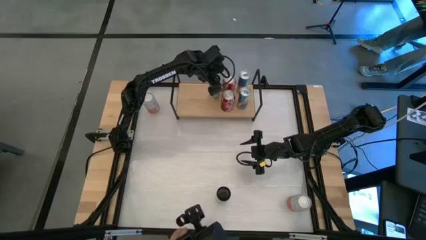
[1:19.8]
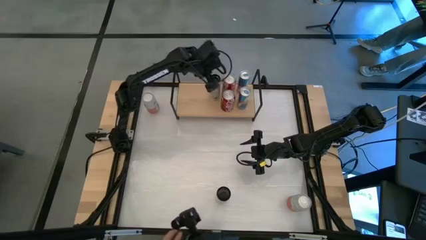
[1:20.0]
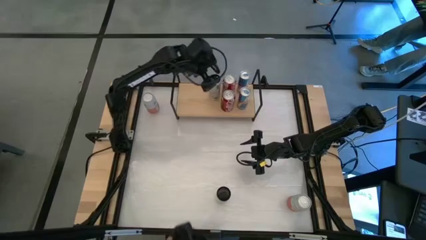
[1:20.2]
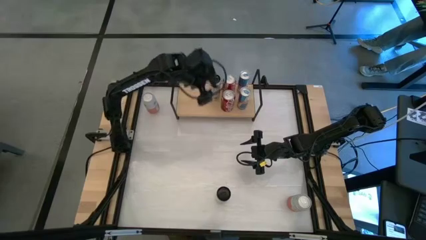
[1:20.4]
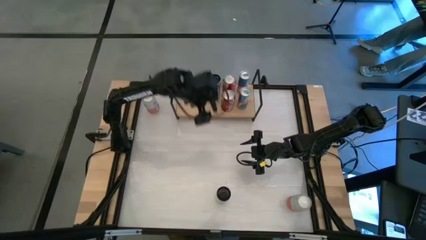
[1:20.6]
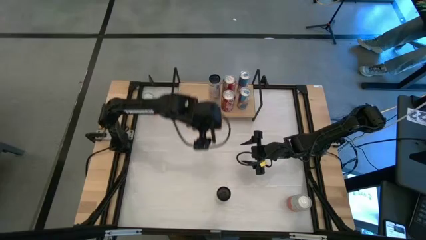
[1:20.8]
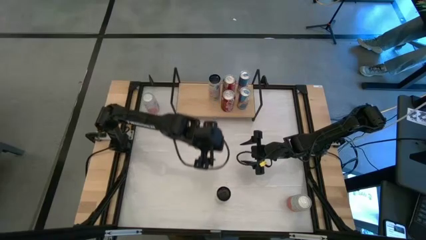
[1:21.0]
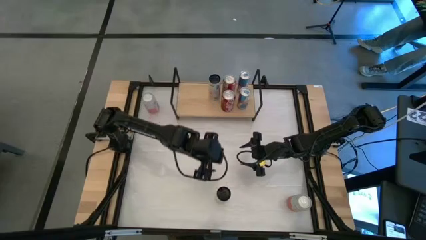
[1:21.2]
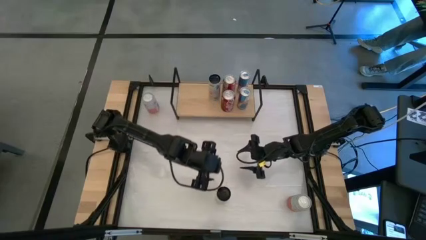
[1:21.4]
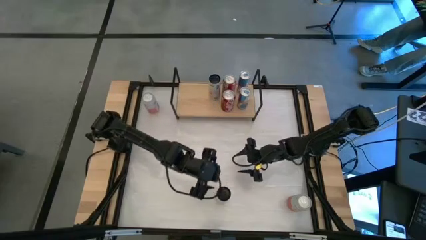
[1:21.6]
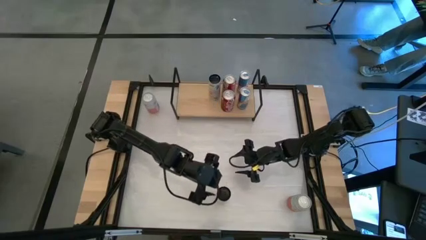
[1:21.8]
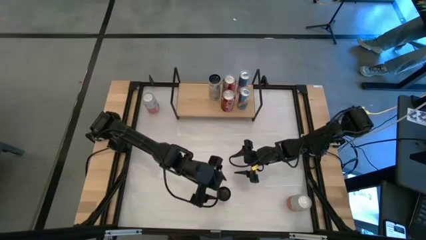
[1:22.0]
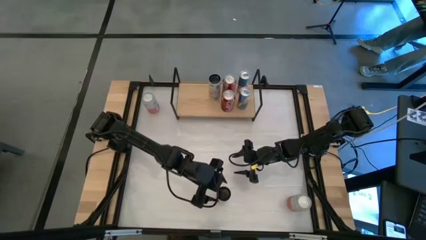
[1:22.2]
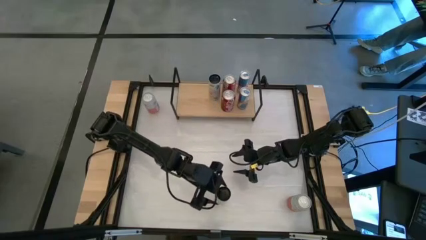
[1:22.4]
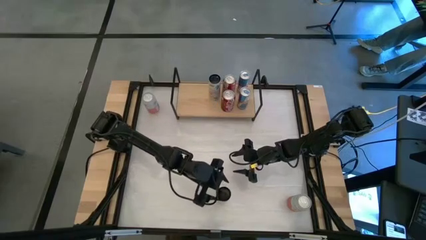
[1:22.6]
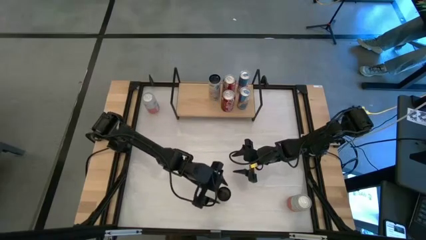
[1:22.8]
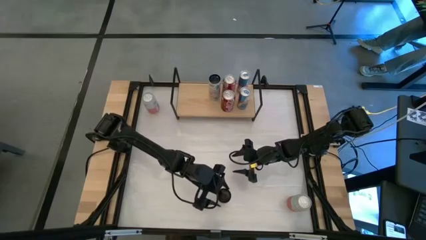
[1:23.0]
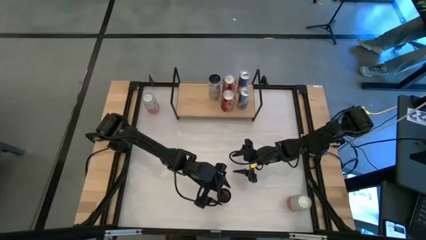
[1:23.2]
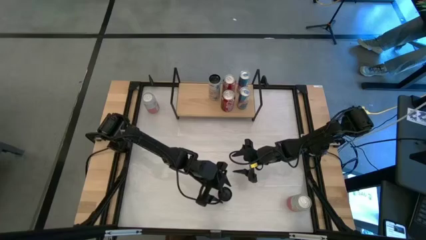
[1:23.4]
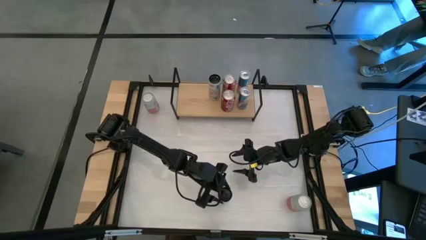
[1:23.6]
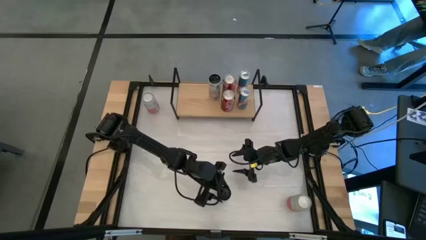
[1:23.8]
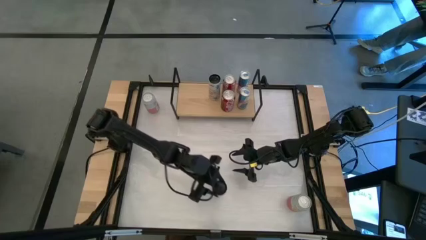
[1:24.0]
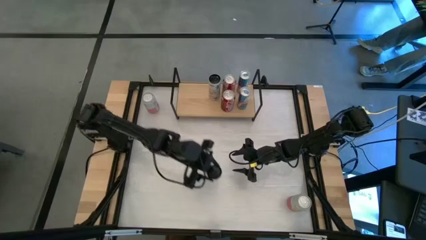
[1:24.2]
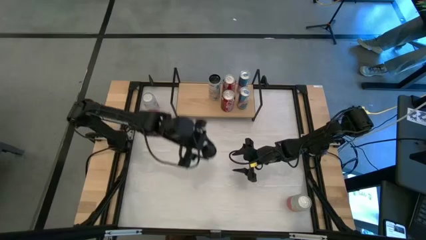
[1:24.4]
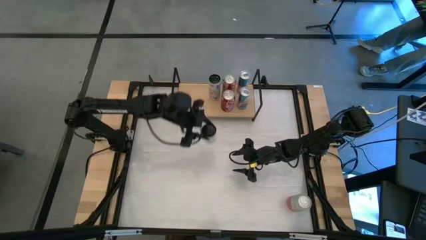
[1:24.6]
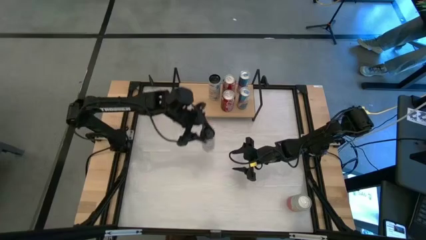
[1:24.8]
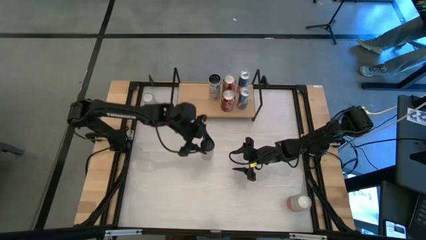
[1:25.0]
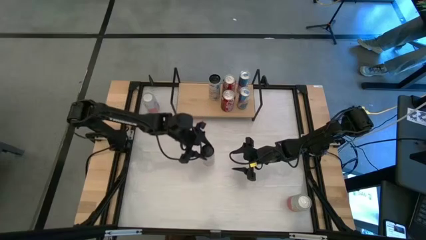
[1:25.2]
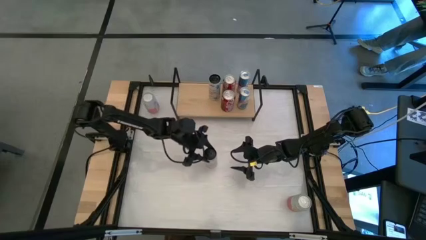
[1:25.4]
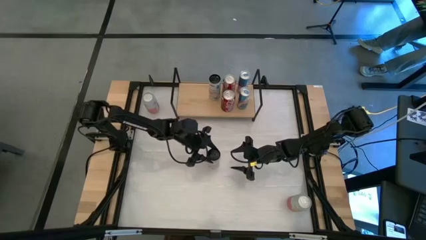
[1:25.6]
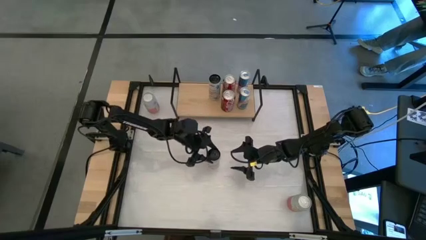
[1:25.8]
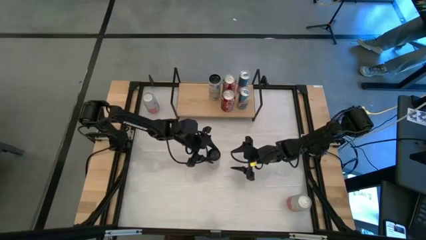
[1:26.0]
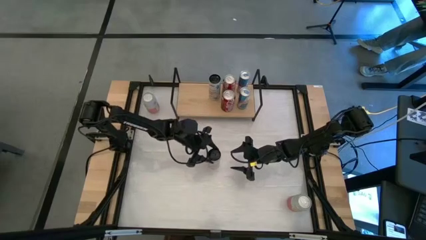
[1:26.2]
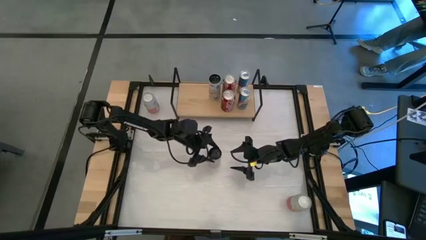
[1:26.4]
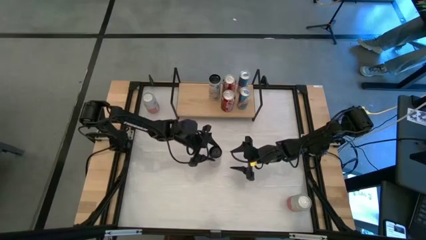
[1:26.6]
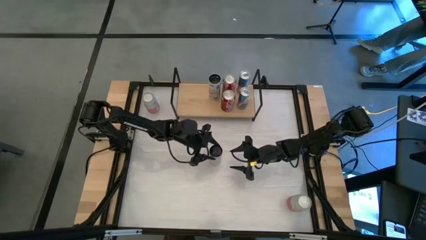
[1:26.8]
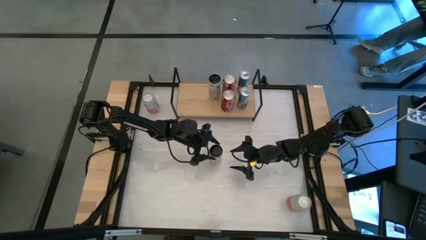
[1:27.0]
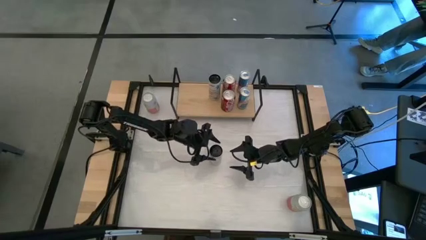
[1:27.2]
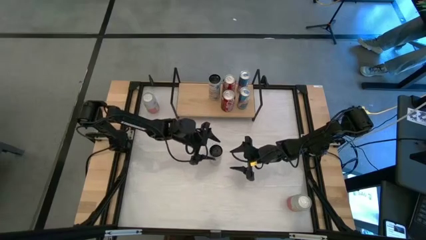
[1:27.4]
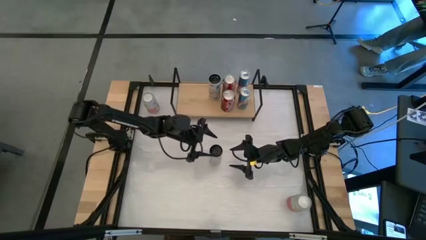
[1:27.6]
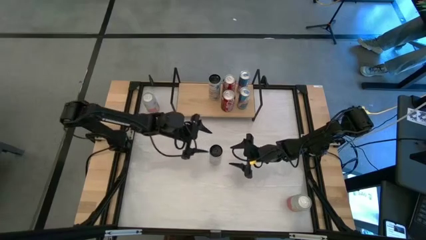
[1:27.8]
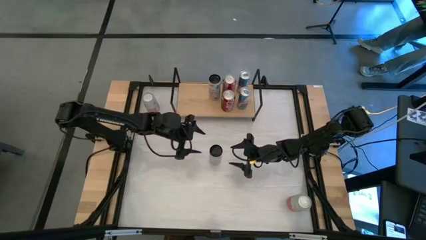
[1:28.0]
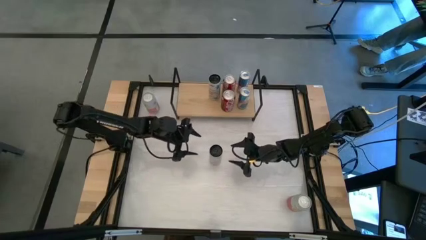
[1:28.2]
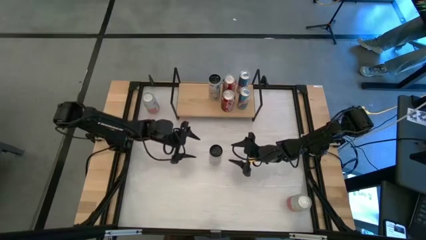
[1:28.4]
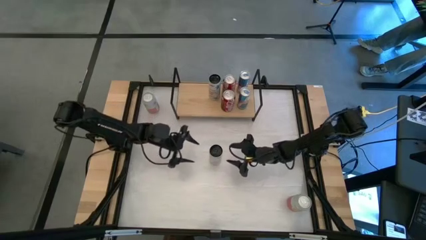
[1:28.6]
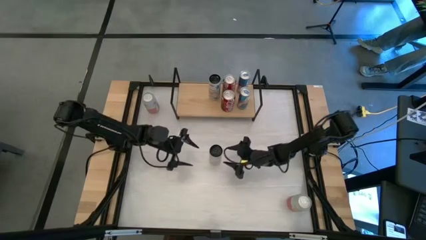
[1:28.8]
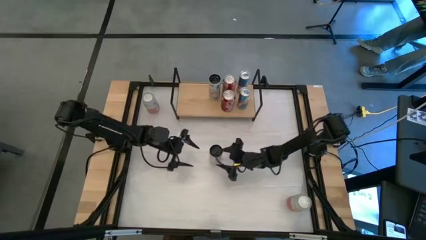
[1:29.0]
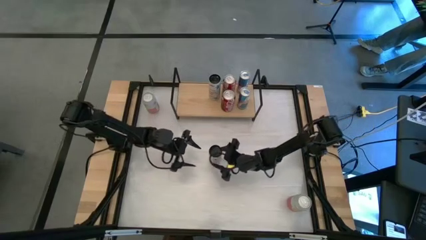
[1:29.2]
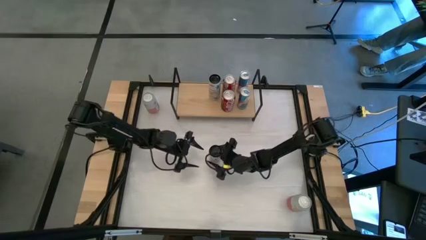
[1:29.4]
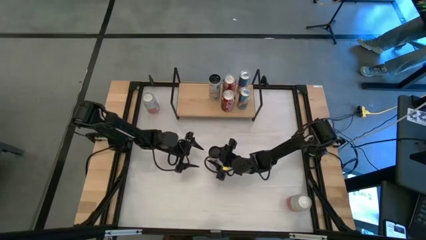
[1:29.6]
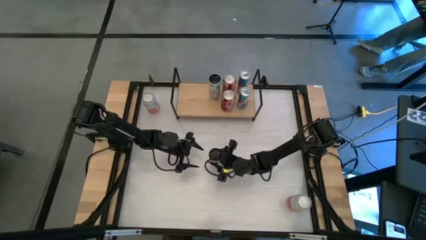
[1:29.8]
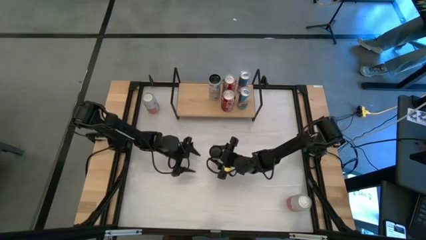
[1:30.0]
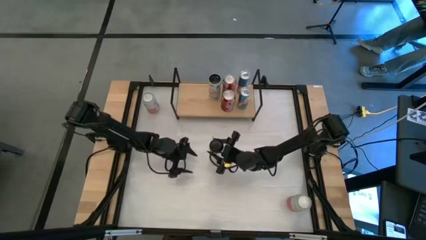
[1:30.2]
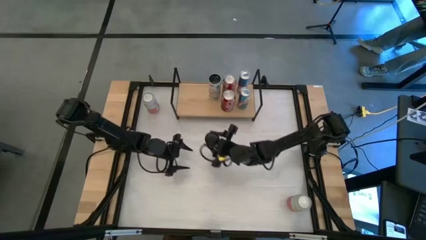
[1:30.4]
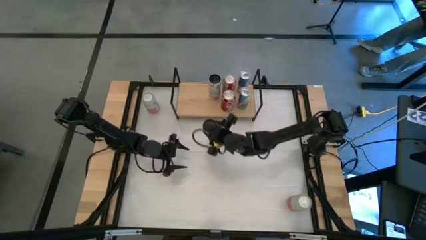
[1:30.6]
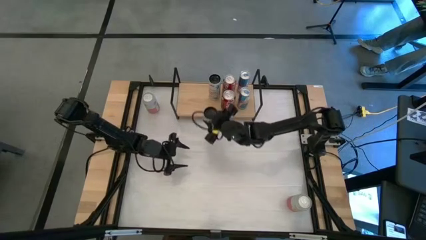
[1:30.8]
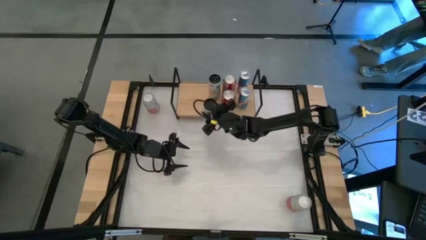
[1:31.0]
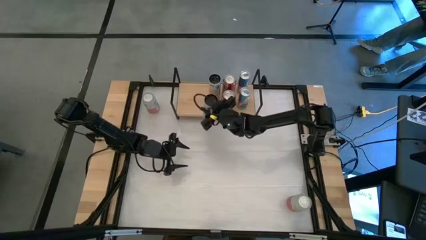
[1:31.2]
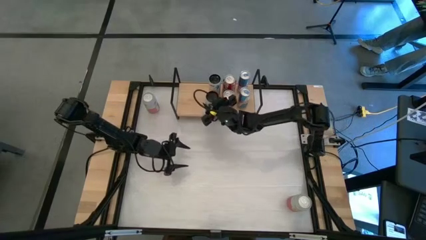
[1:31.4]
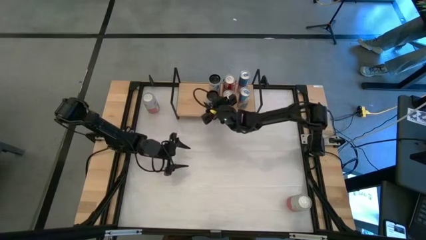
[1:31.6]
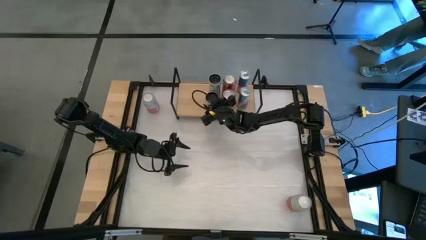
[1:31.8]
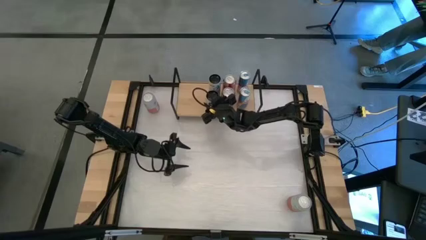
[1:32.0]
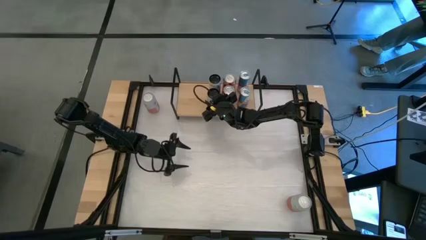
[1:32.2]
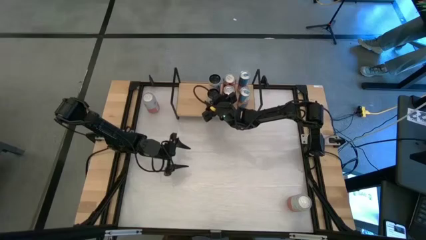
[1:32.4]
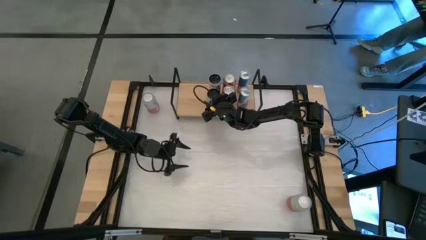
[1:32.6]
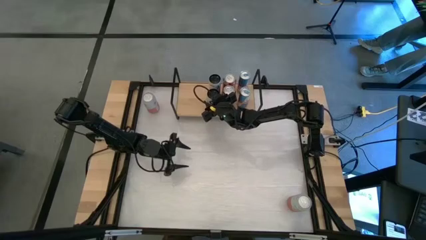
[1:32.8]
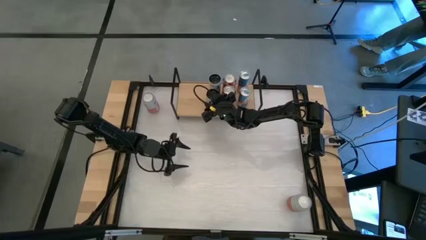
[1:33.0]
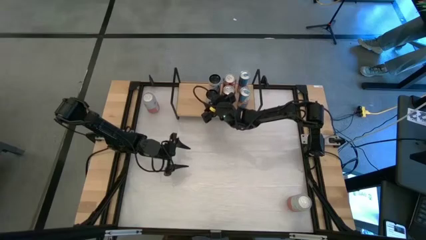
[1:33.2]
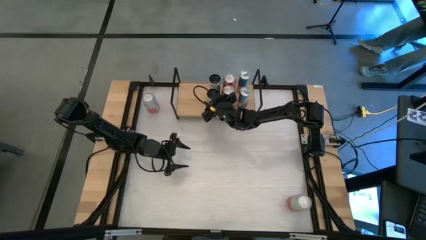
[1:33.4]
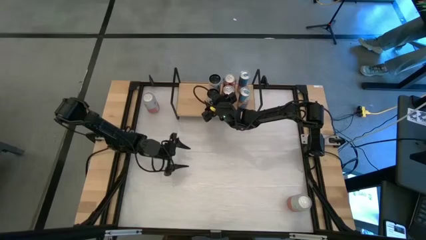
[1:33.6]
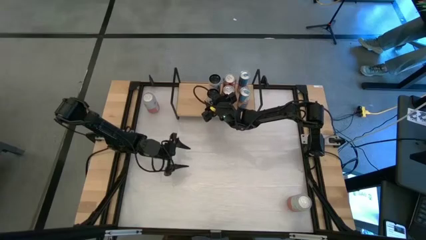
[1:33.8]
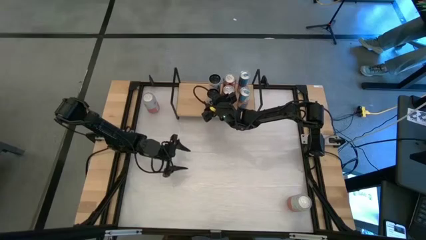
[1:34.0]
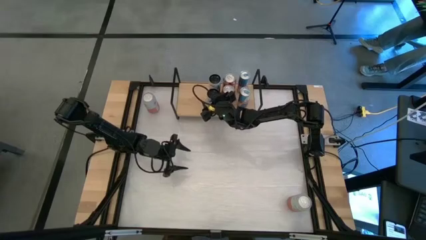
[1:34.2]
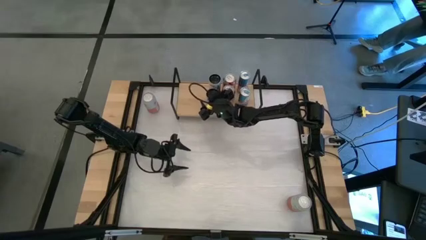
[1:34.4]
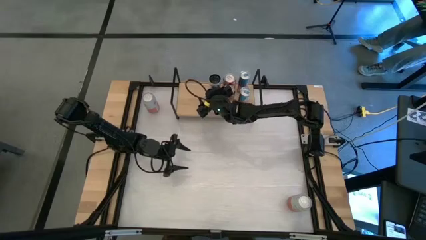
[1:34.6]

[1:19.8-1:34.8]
Task: Place canned beverage on shelf
Put the black soda can on the shelf
